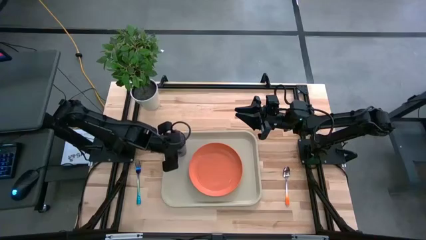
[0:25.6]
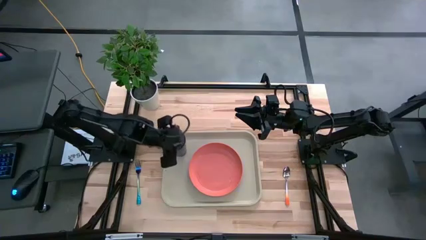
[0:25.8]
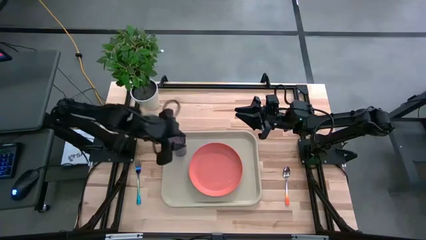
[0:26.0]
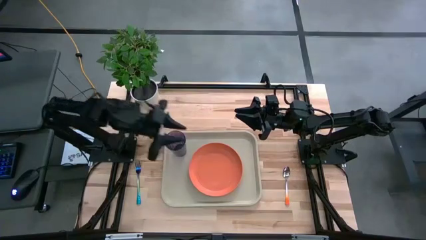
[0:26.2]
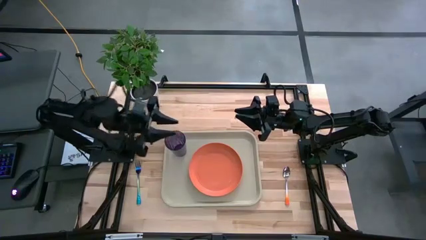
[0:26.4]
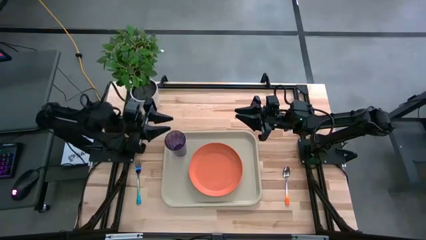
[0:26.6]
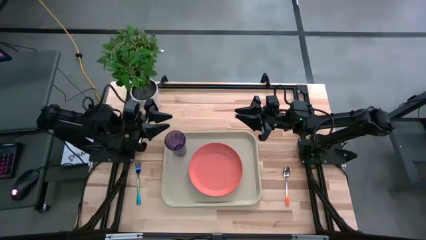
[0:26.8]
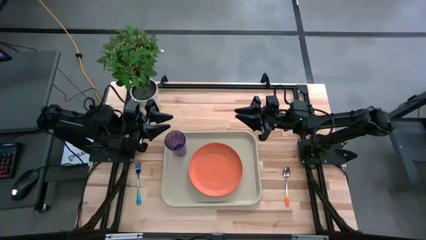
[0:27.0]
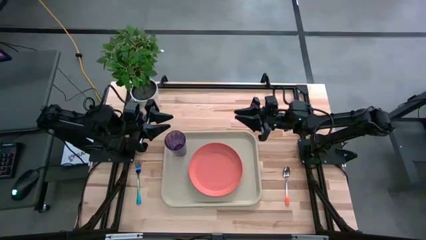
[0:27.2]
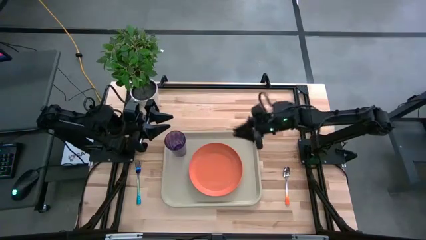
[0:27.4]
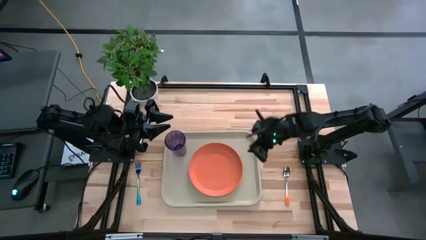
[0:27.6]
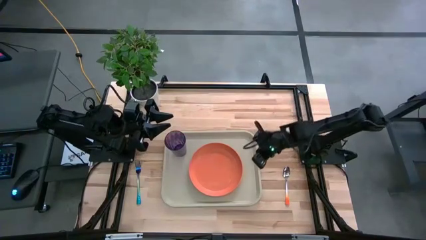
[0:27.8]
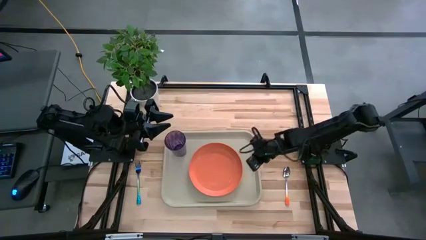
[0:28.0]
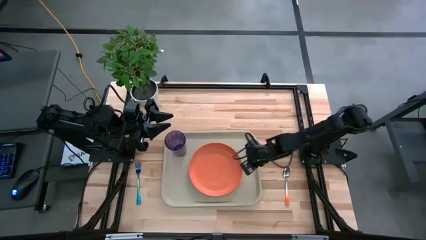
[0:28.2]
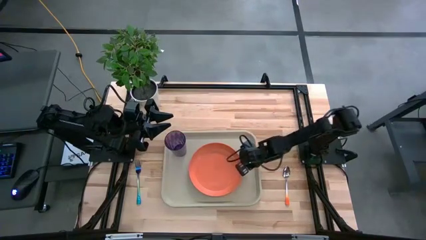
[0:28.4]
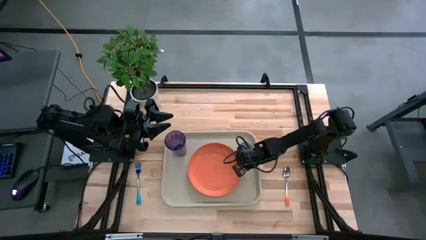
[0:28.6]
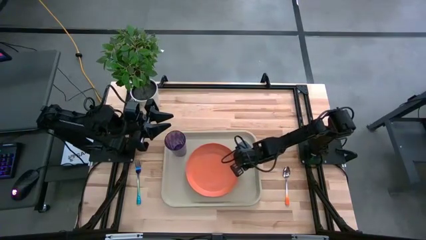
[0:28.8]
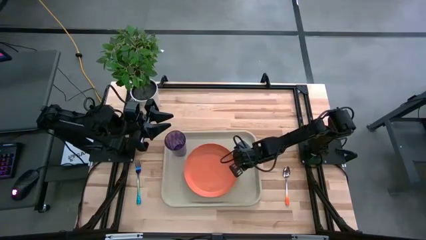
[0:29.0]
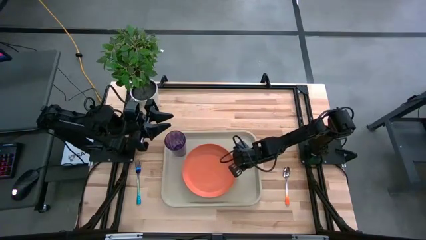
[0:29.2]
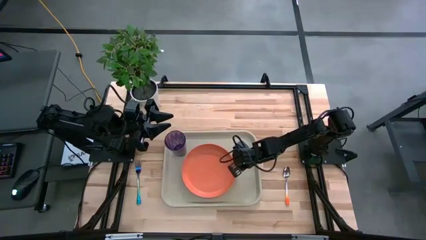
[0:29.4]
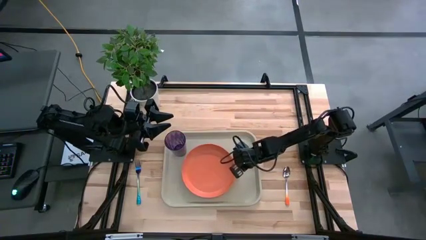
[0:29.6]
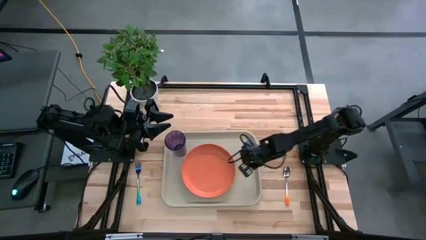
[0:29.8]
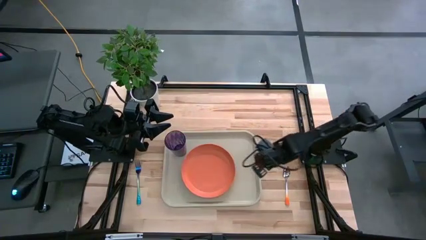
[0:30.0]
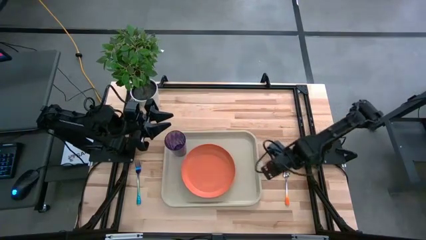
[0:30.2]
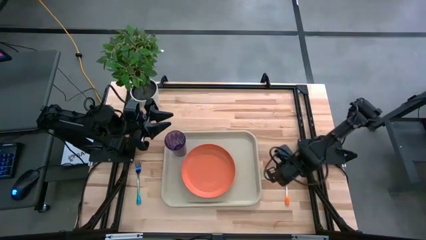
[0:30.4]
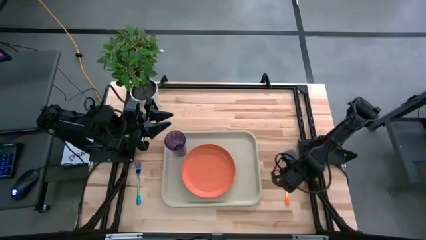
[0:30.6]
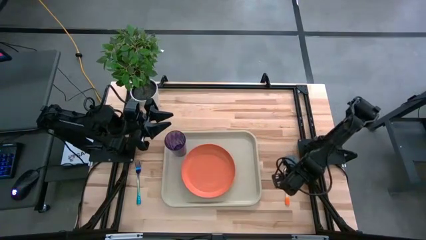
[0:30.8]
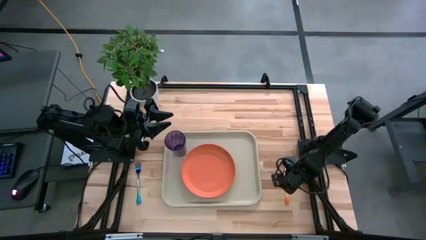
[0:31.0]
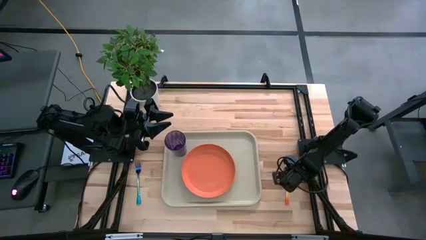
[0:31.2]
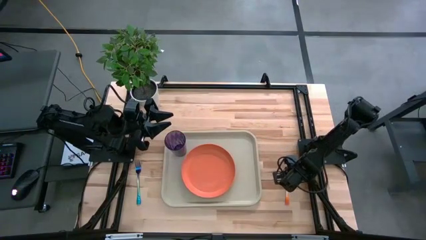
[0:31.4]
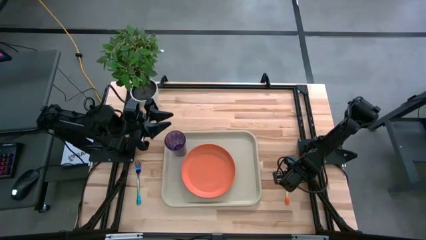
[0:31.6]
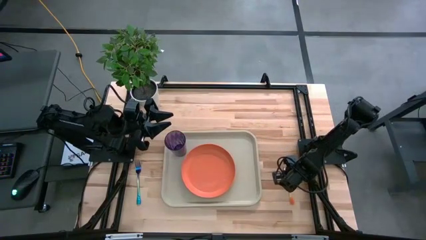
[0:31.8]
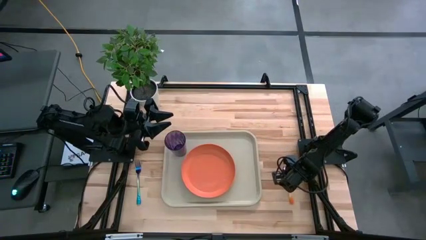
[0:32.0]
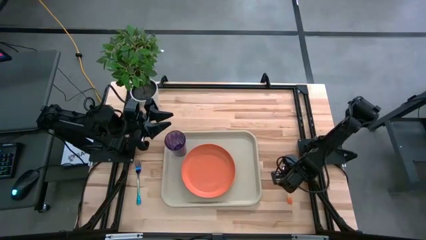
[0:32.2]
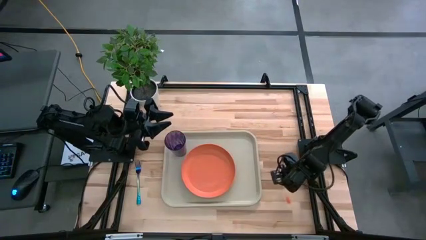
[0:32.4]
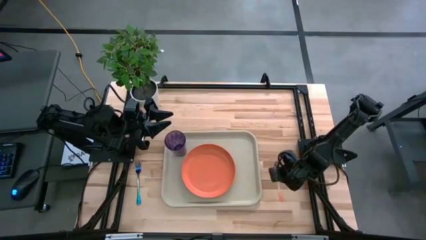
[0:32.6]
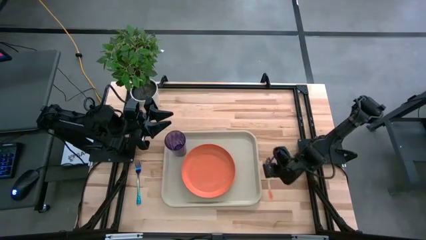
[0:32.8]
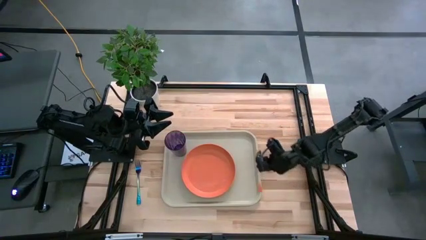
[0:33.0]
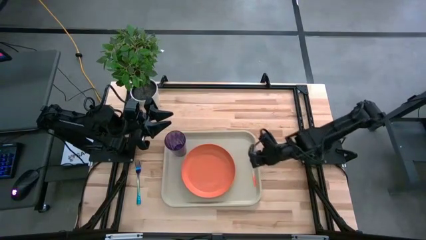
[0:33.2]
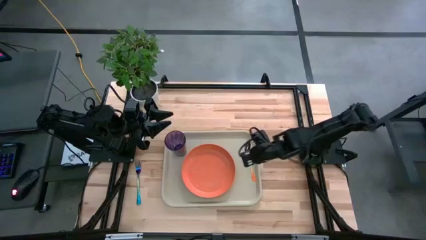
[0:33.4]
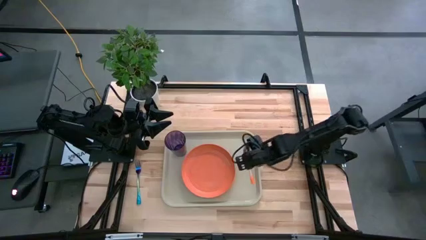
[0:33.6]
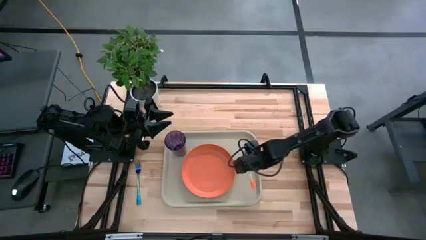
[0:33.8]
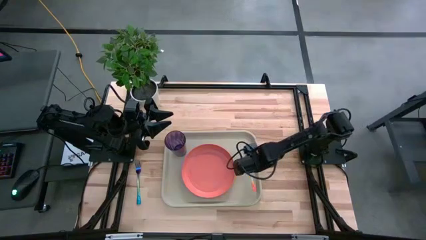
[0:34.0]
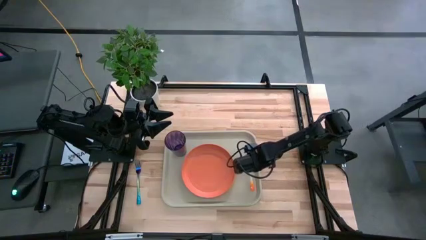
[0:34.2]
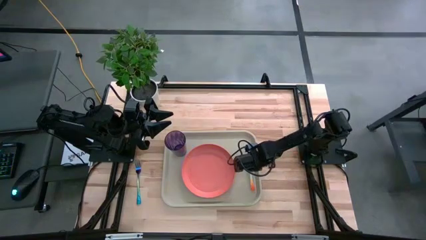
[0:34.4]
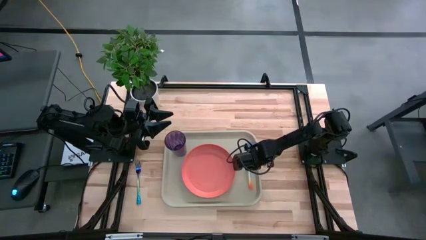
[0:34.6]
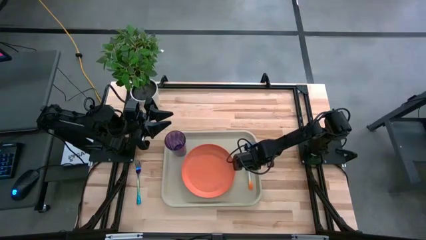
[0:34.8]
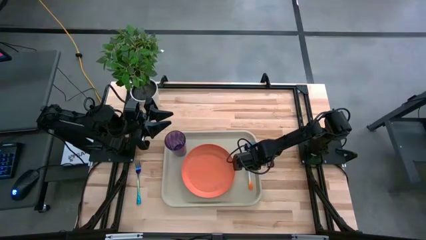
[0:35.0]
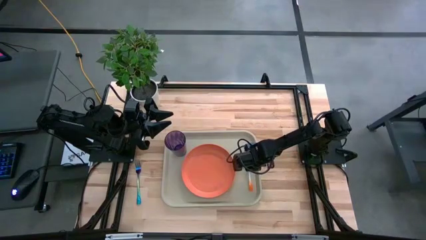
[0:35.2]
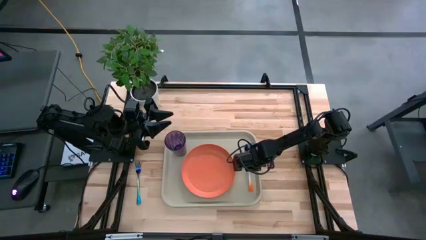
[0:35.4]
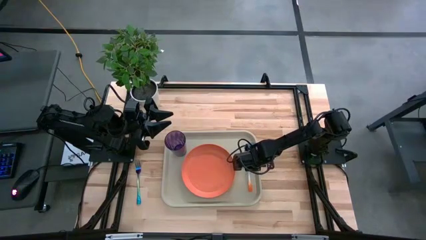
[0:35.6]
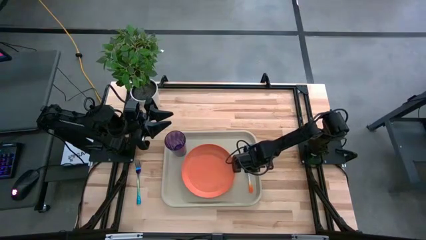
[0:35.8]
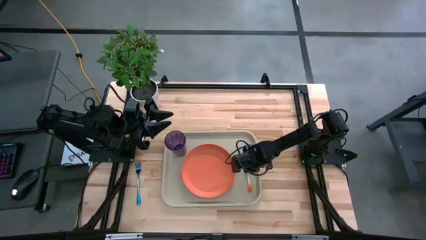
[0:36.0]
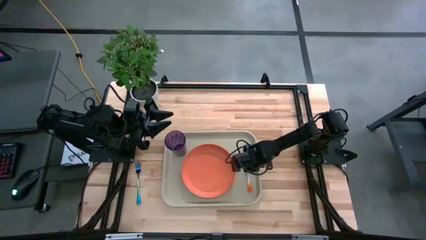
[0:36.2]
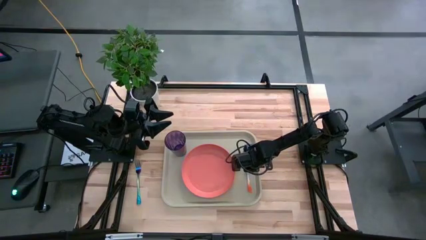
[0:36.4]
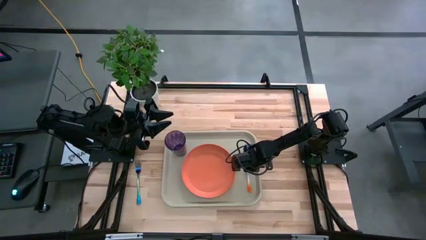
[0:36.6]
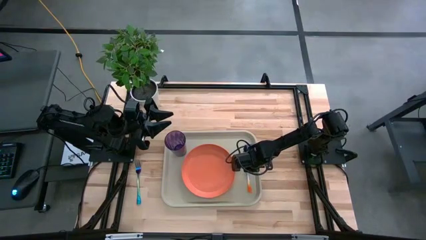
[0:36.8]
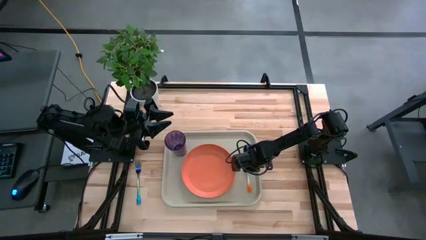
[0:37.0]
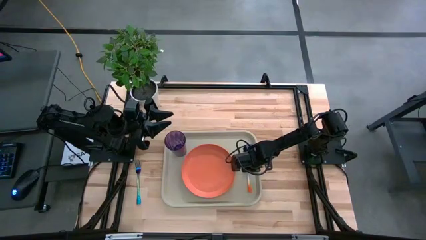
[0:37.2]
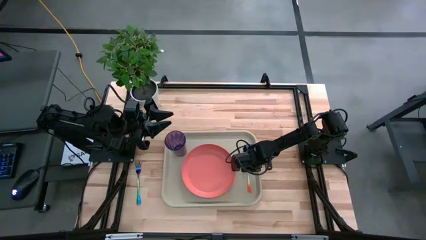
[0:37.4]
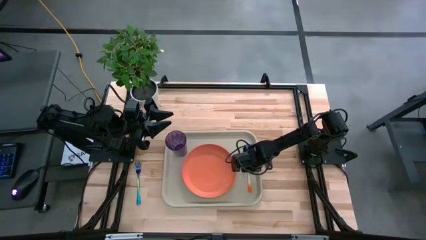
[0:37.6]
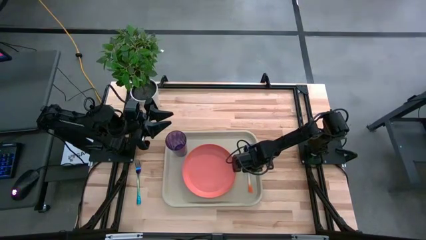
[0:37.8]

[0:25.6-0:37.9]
Task: Pick and place plate/cup/fork/spoon on tray
Put the spoon to the right side of the orange plate on the gray serving tray

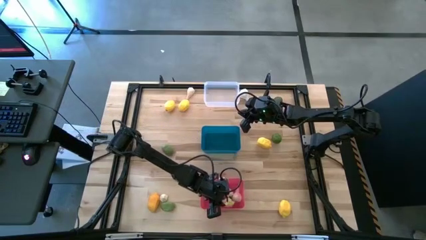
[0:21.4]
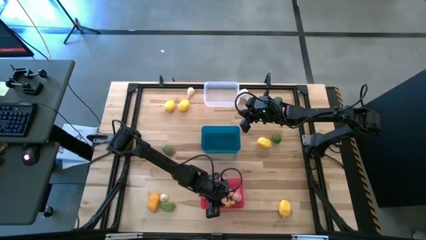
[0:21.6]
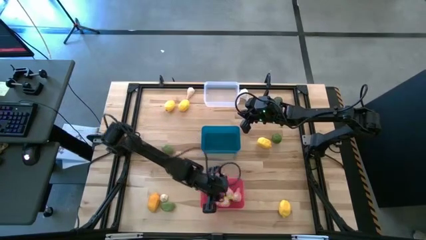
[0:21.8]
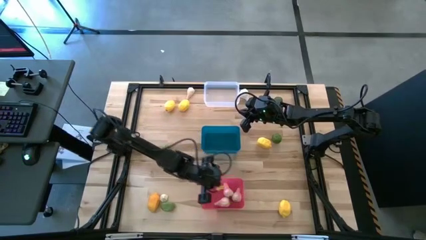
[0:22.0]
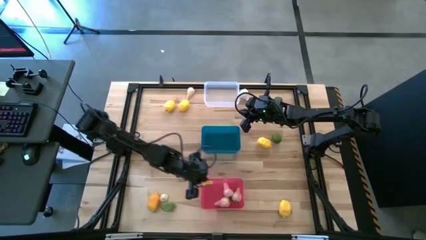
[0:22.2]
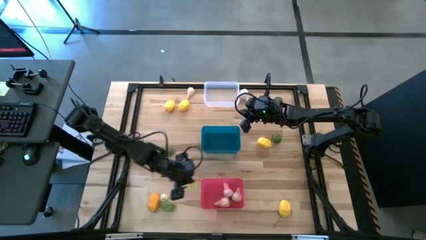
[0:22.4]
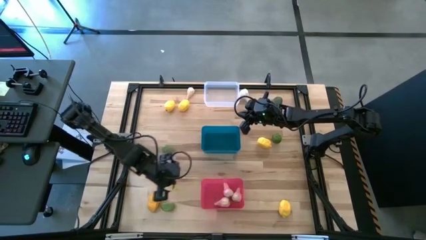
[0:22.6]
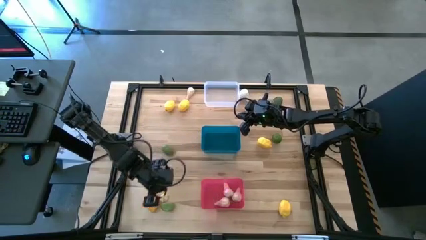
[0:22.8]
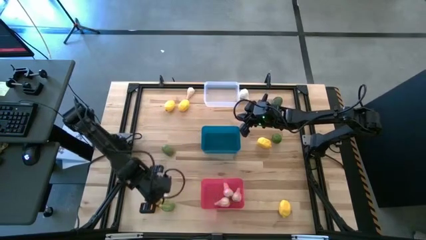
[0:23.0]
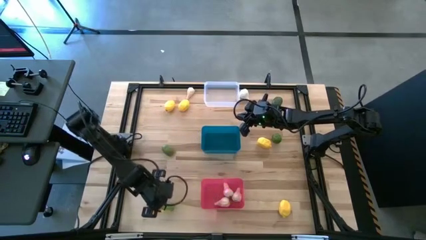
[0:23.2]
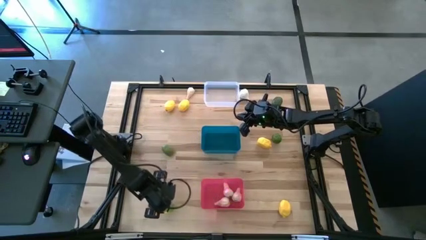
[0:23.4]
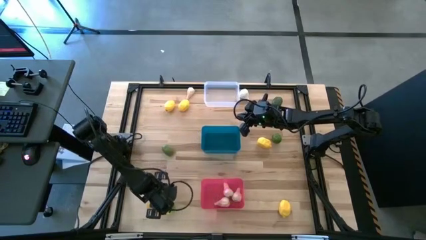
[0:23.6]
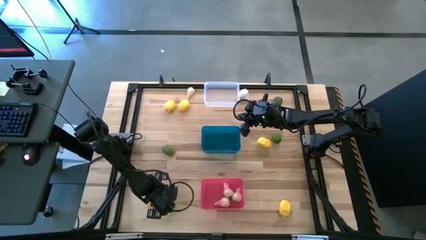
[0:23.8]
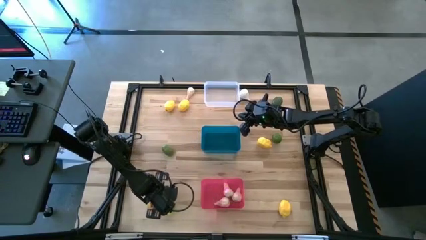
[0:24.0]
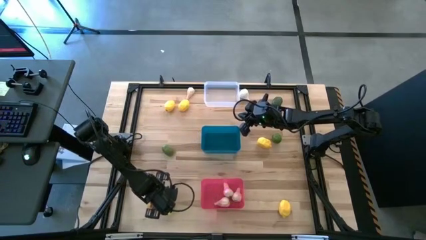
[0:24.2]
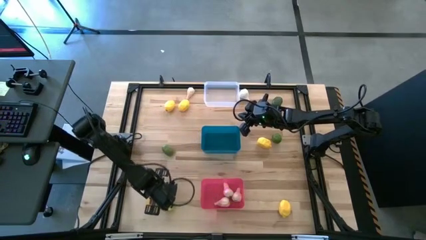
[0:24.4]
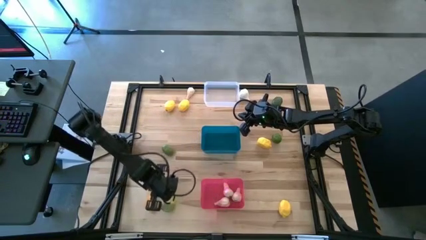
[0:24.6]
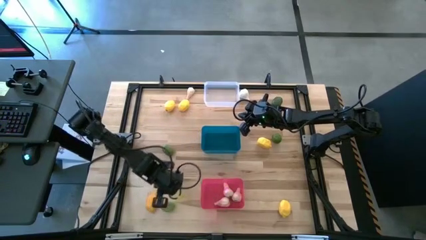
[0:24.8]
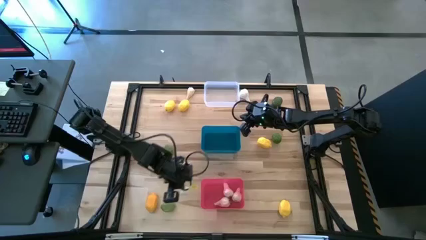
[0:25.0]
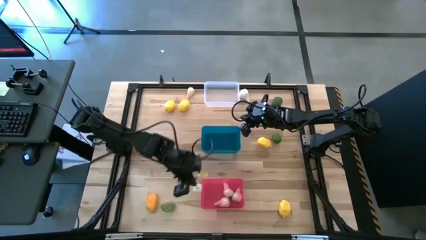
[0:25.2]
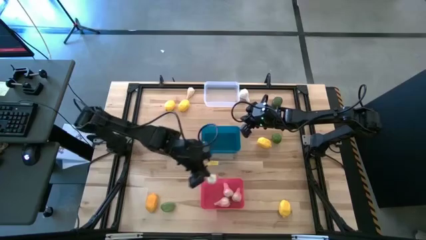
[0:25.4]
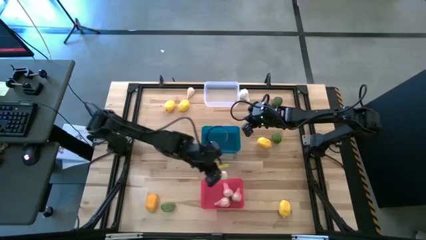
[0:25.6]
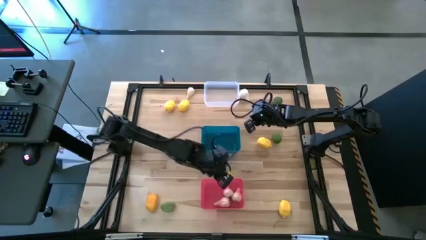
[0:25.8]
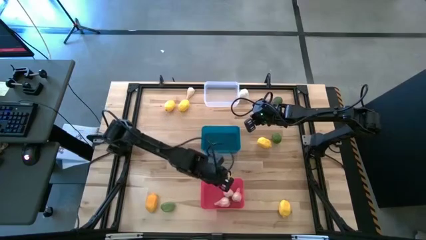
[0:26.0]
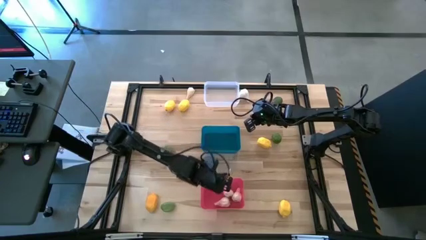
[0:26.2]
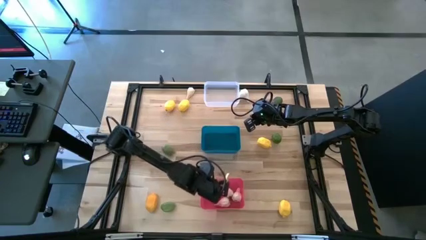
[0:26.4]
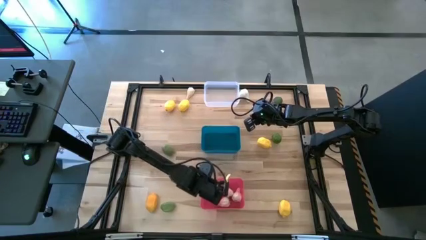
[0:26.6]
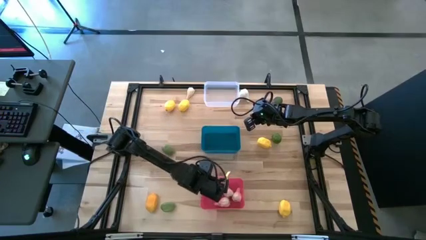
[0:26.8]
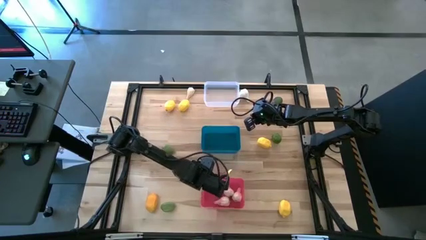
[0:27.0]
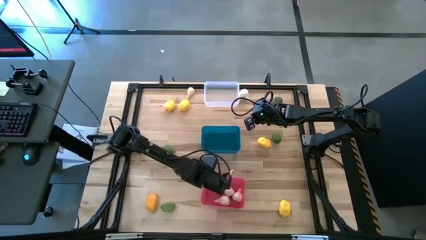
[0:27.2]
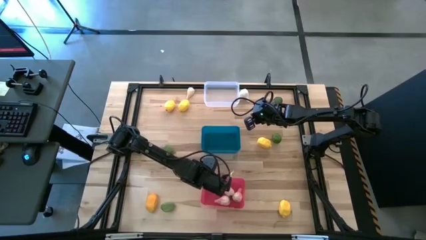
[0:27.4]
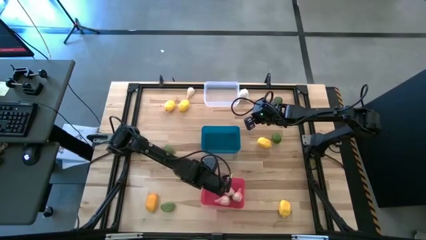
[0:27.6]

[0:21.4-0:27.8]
Task: Sort produce into baskets
Put the garlic into the pink bin
